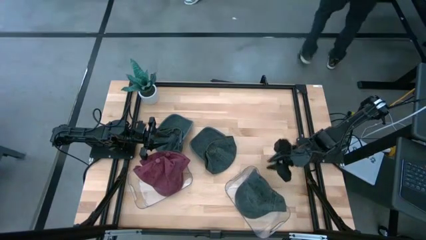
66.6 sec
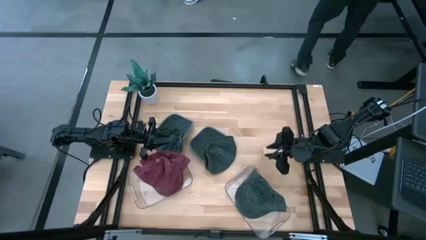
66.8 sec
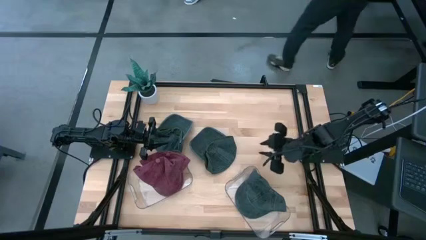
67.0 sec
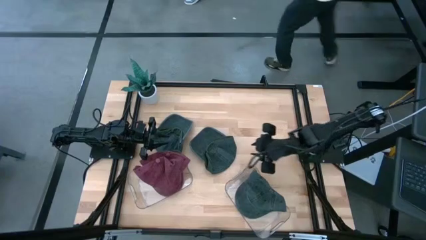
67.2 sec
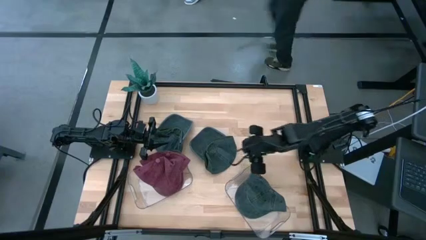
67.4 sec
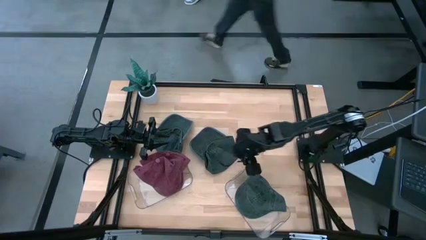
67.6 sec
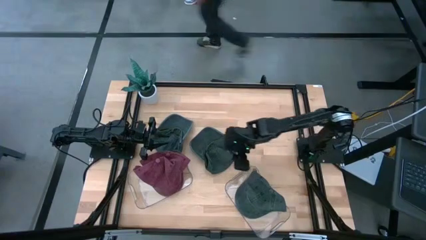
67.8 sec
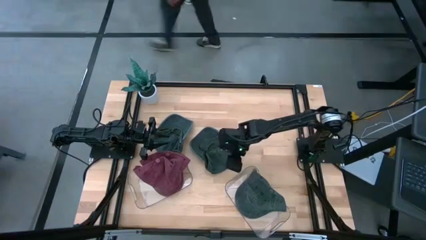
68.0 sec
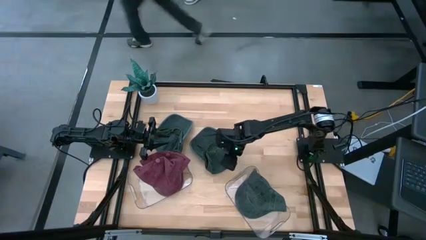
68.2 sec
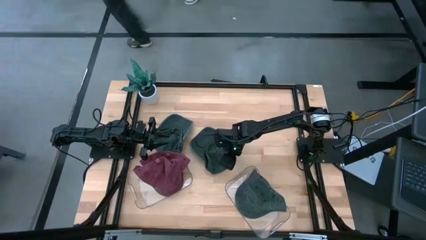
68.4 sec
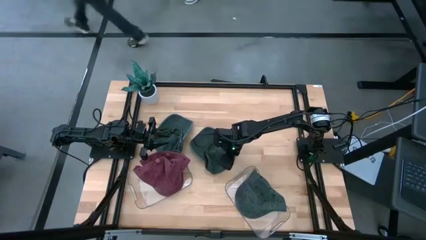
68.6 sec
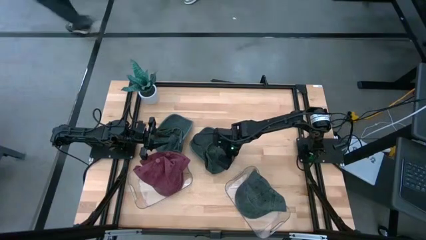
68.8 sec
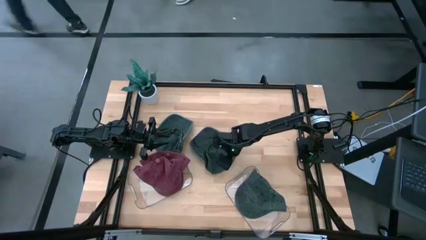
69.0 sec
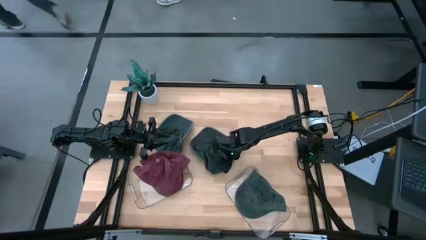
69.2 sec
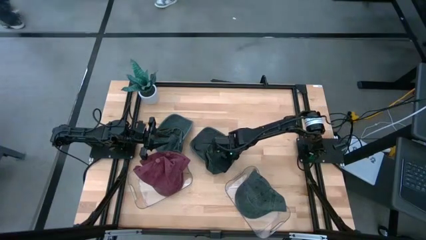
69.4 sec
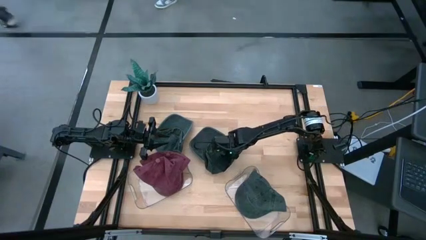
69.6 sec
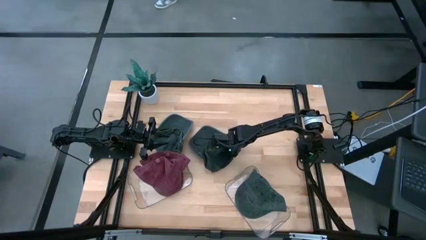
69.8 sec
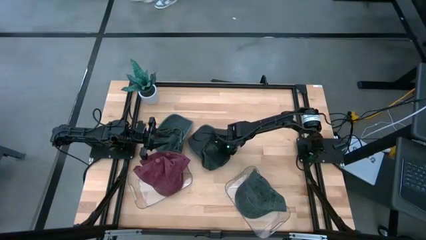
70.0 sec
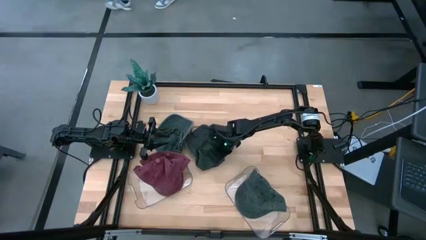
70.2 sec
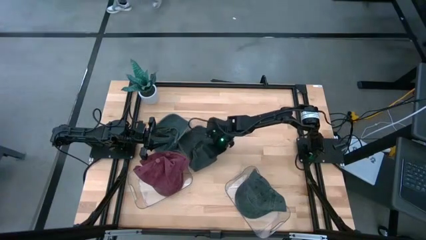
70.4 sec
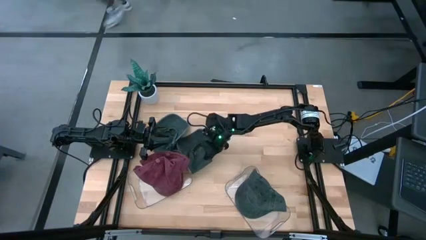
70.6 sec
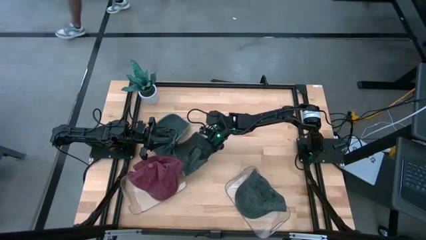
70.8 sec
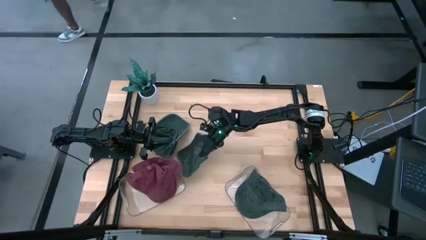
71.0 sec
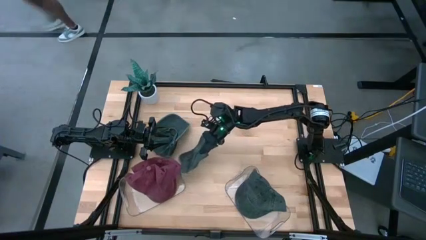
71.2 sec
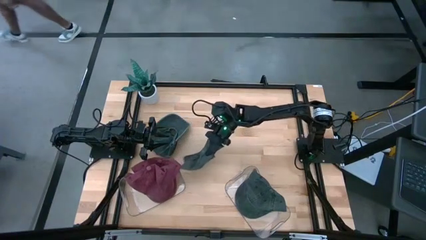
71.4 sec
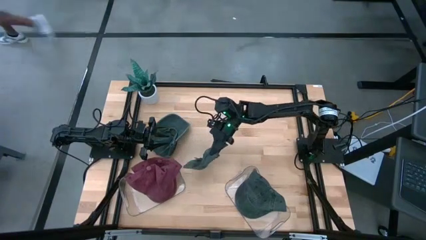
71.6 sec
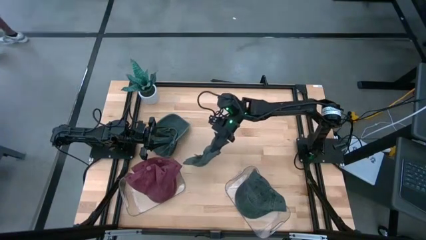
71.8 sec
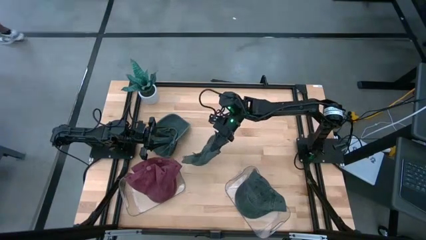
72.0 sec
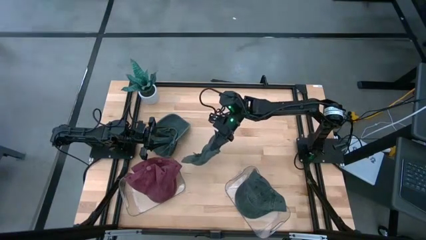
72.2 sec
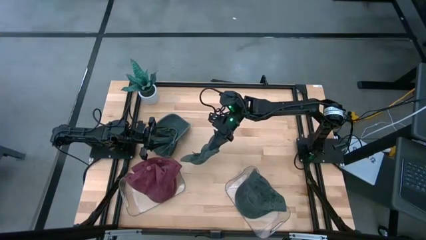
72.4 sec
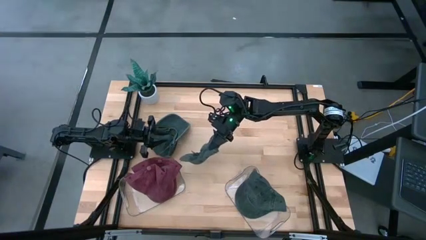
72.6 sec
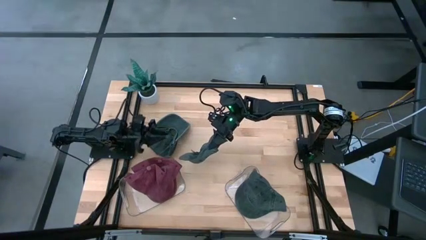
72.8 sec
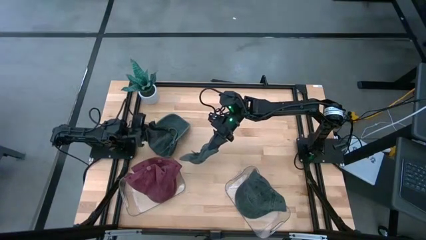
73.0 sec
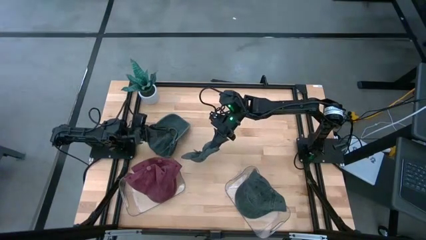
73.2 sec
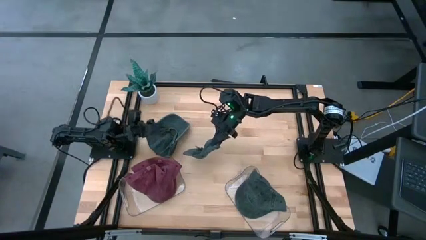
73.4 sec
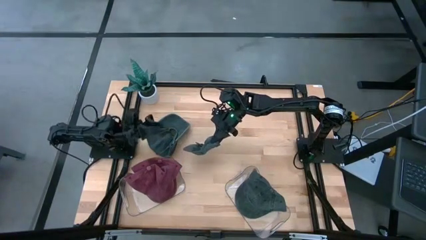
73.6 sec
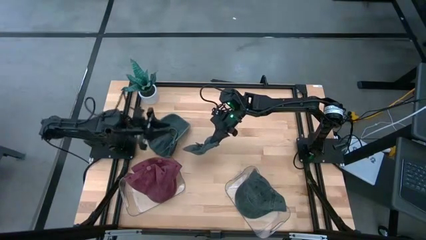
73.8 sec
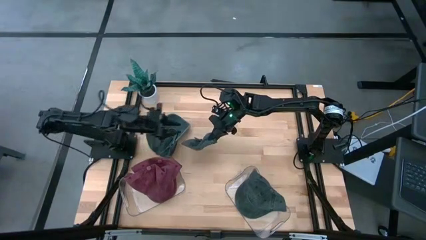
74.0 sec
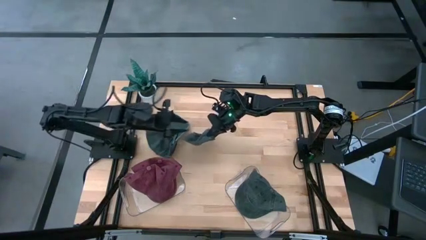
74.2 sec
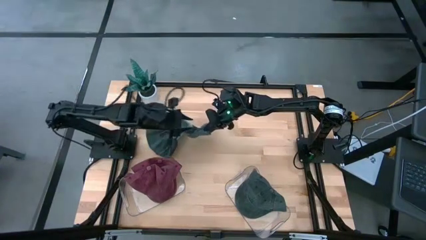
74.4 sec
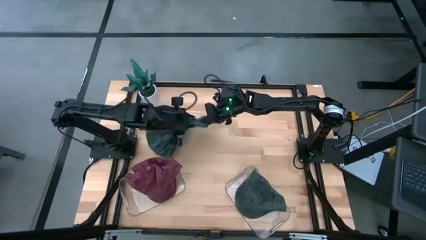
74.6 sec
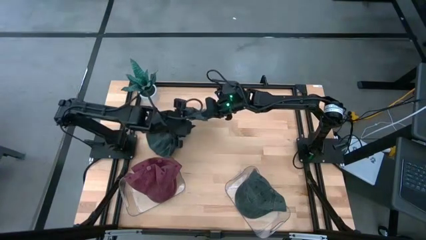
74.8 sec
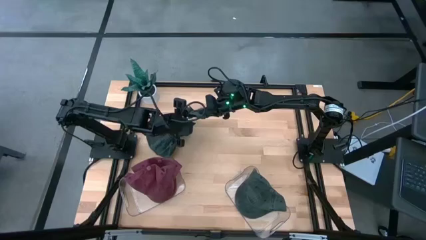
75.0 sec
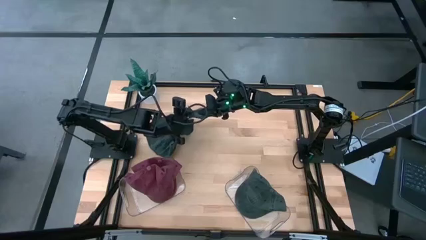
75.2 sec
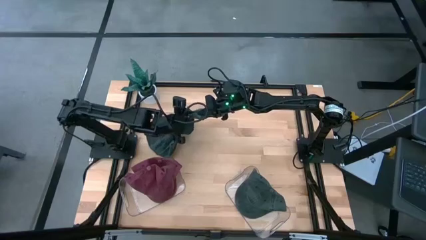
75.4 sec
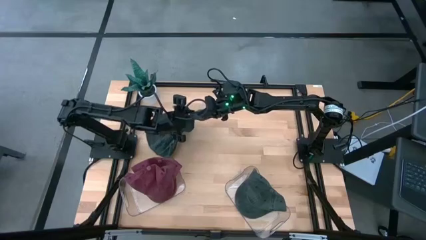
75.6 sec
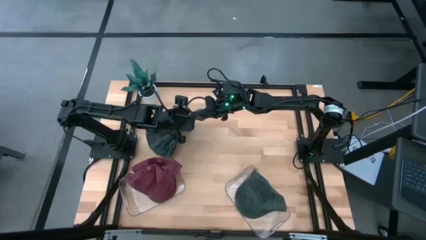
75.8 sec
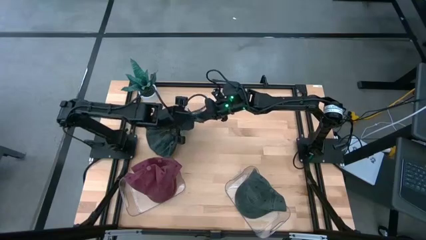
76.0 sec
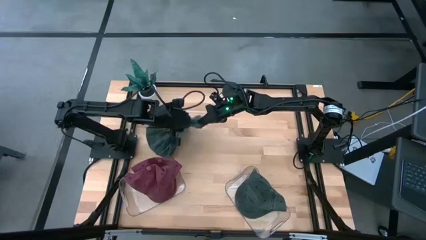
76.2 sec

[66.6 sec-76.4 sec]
Task: Pick & Place hat
Put the right black cap into the right transparent bin

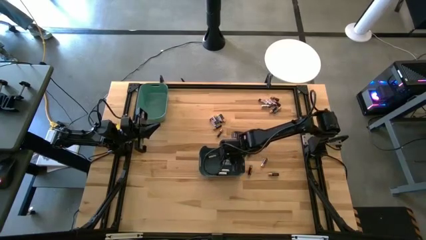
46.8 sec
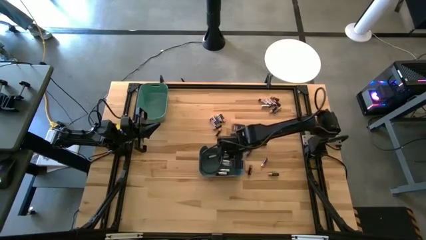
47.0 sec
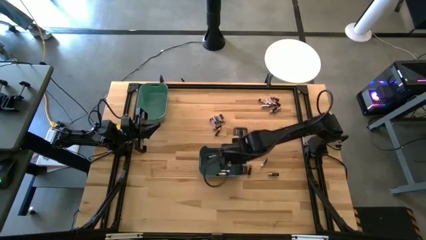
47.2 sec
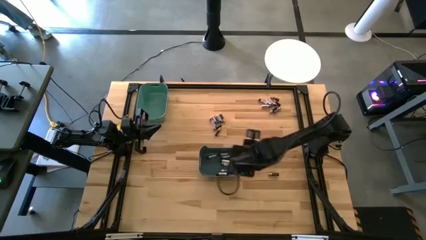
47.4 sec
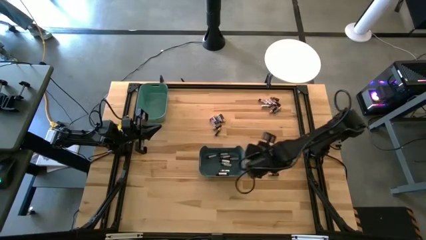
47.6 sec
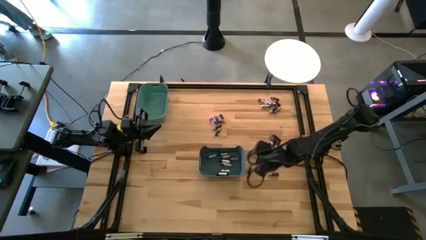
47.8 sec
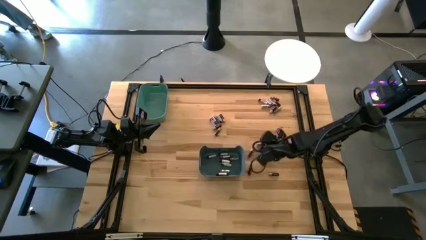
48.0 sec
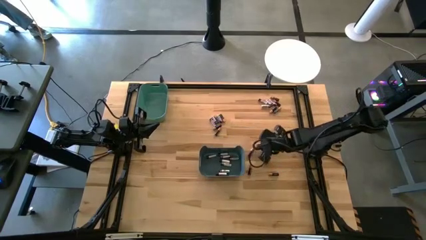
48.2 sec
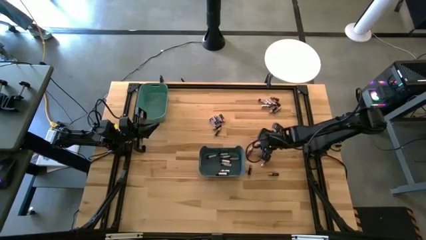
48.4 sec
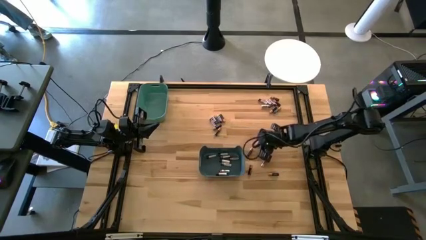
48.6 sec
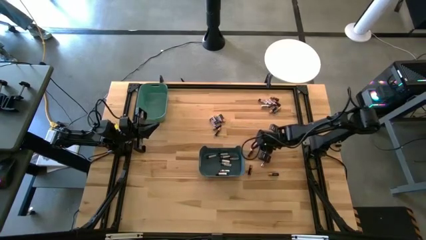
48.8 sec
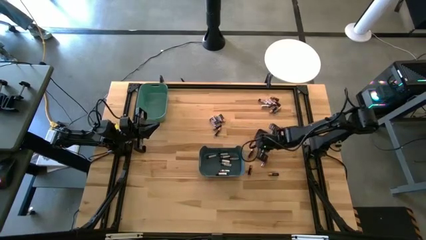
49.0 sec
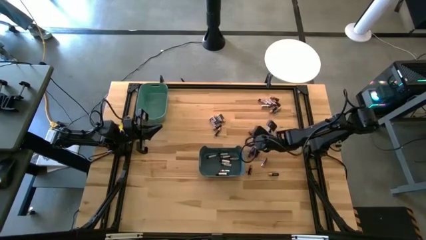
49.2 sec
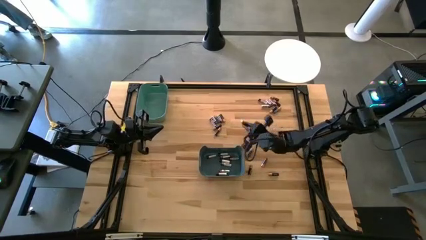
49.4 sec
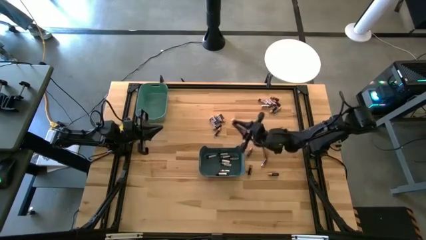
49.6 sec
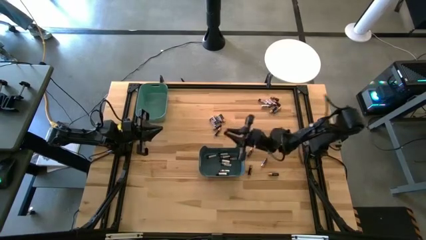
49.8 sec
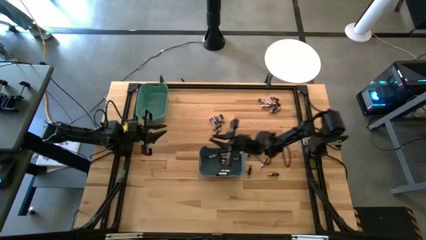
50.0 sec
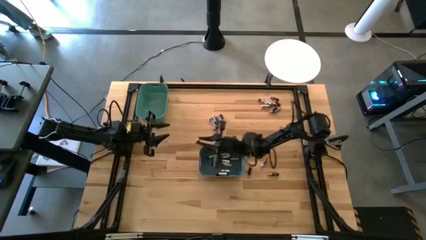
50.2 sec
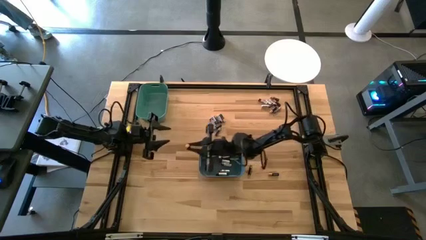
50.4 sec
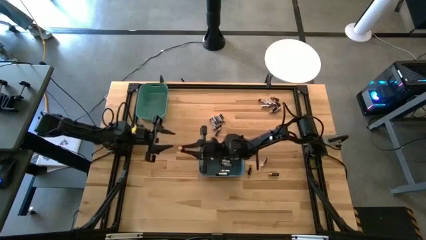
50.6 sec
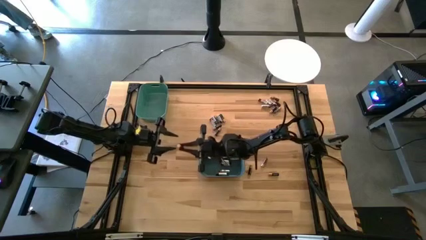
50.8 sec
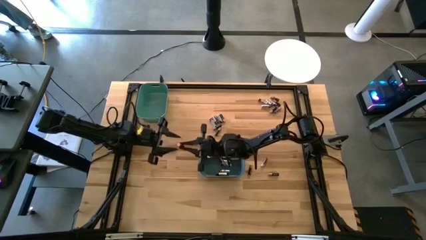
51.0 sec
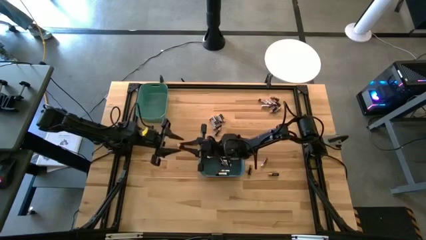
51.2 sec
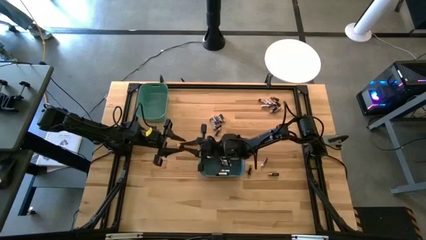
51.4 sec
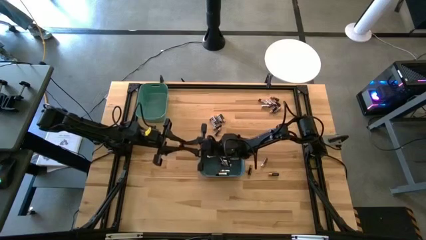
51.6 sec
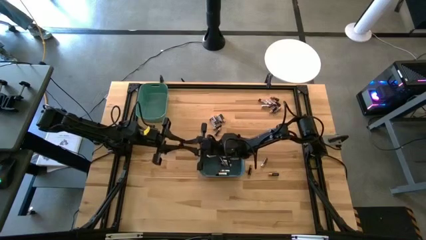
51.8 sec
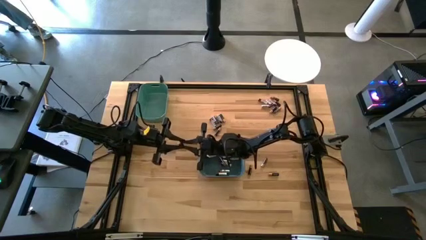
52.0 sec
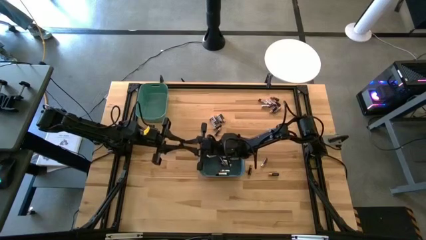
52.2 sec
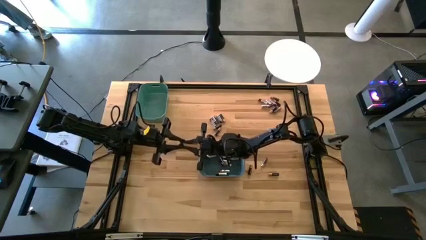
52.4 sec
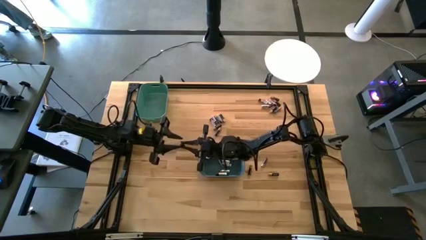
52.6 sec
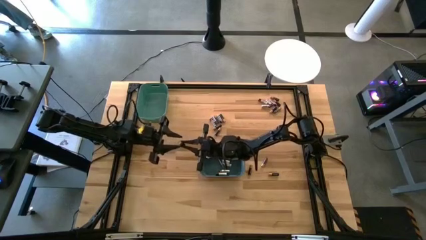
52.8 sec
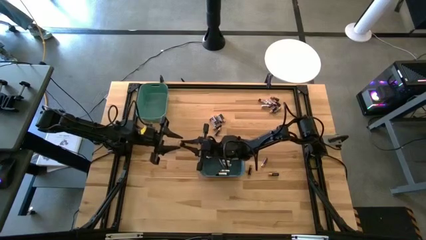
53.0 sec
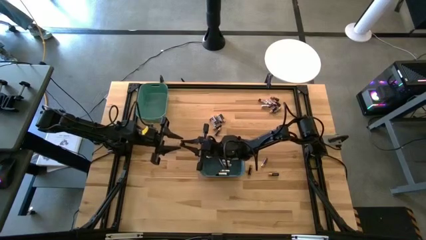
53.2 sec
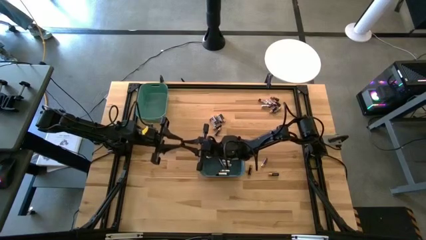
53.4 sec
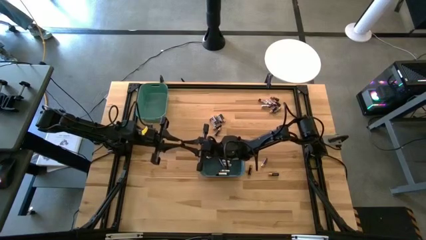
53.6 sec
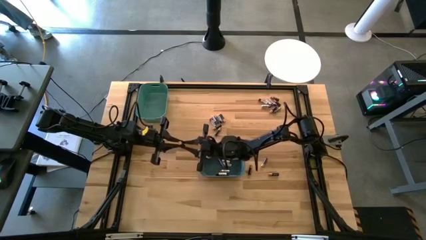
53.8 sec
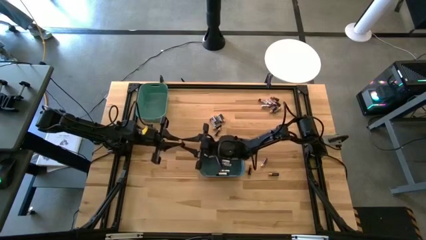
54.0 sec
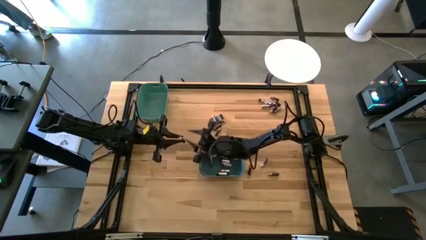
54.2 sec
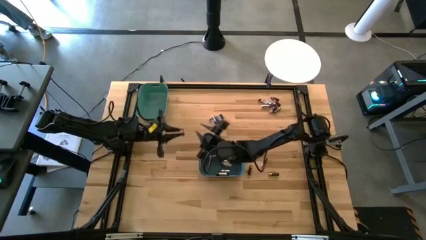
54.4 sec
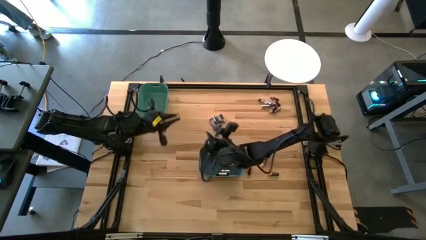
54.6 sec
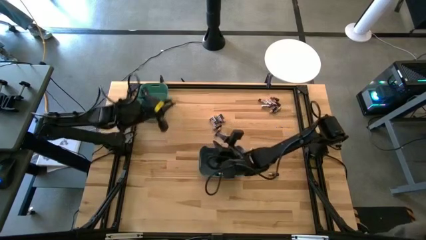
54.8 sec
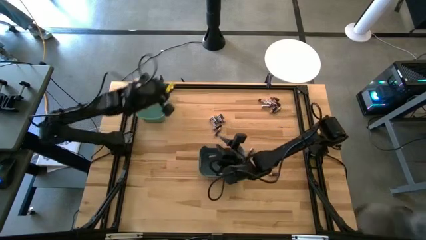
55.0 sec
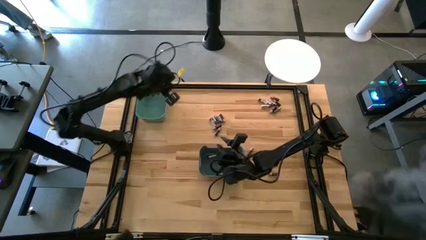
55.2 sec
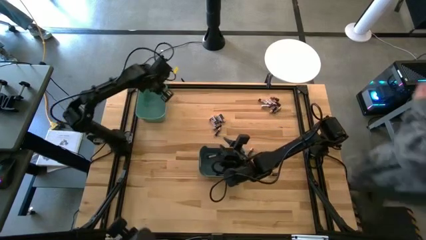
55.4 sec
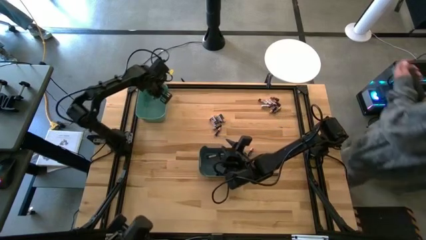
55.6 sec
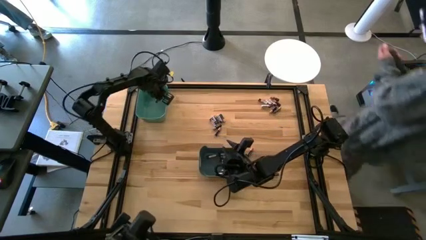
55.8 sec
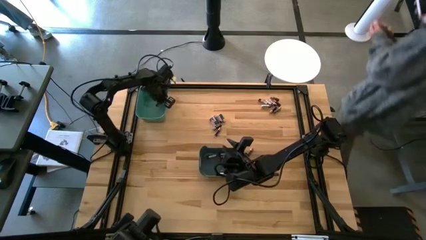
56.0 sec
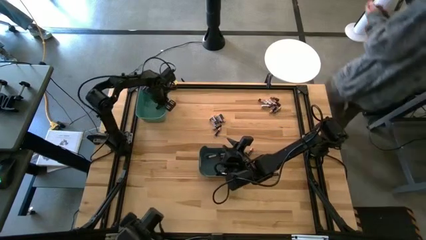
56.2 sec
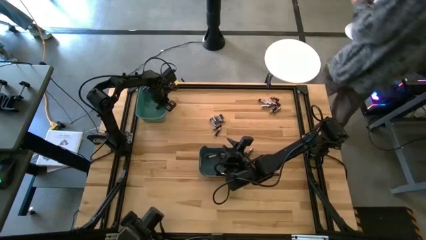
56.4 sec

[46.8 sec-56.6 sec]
Task: Sort batteries
Put the black battery into the green bin
